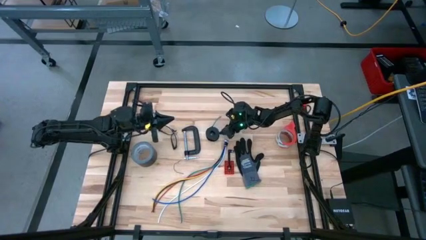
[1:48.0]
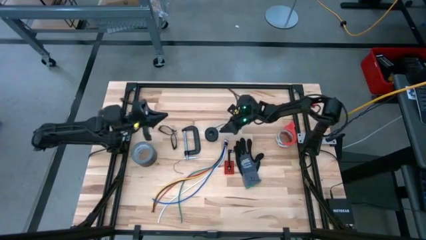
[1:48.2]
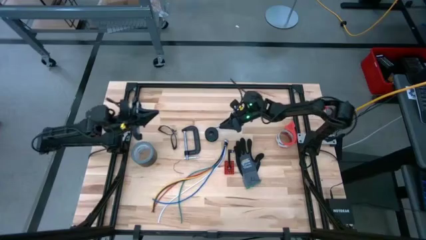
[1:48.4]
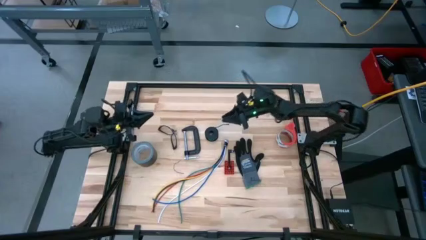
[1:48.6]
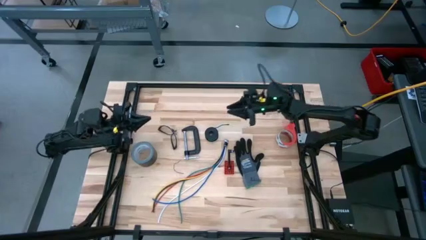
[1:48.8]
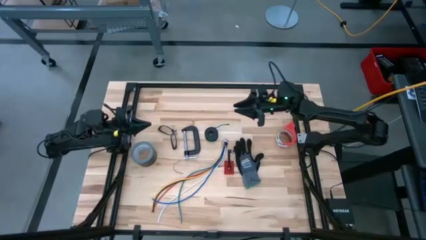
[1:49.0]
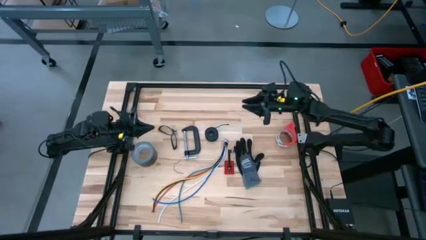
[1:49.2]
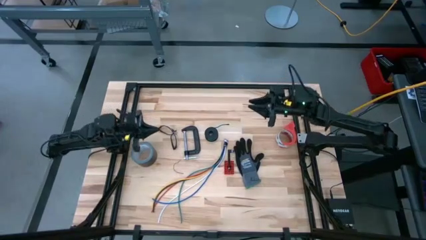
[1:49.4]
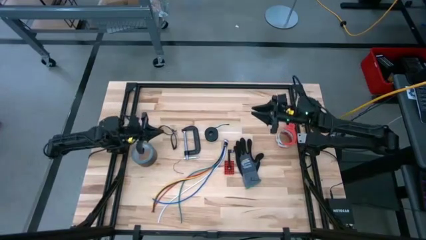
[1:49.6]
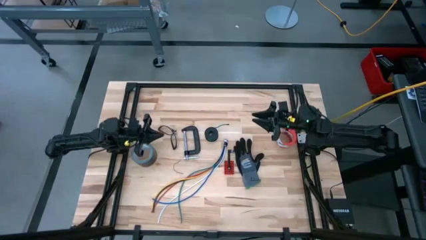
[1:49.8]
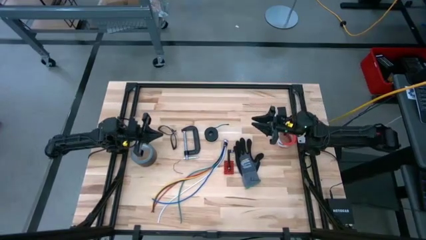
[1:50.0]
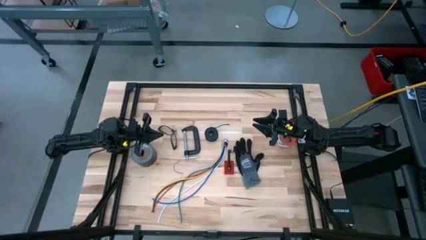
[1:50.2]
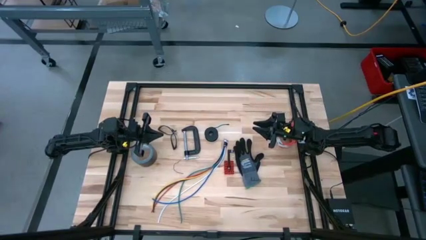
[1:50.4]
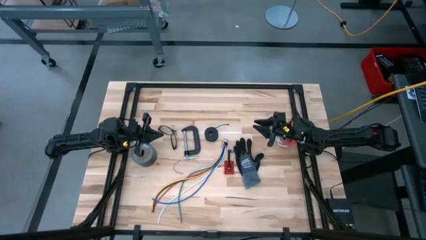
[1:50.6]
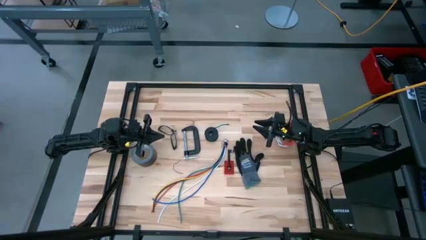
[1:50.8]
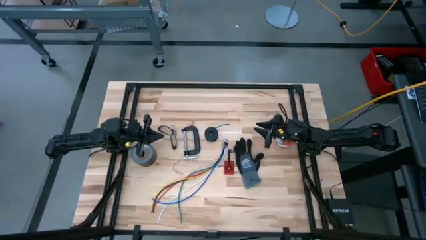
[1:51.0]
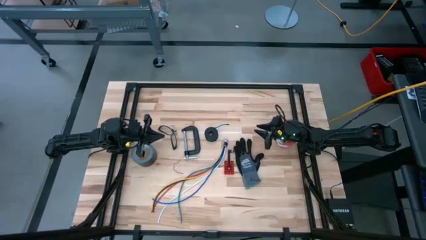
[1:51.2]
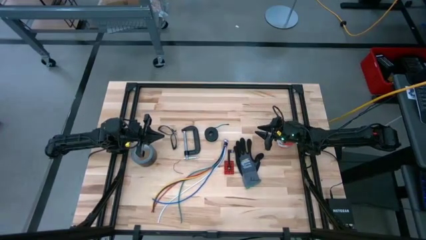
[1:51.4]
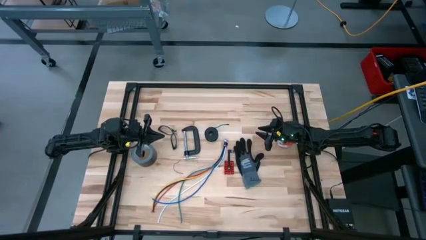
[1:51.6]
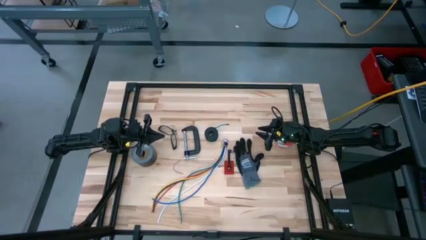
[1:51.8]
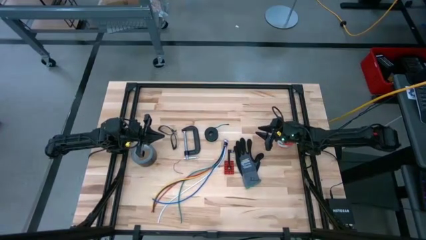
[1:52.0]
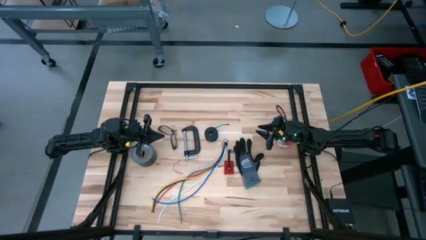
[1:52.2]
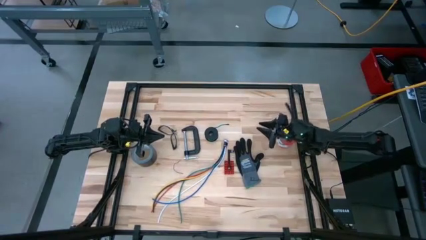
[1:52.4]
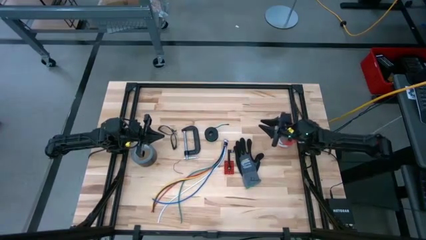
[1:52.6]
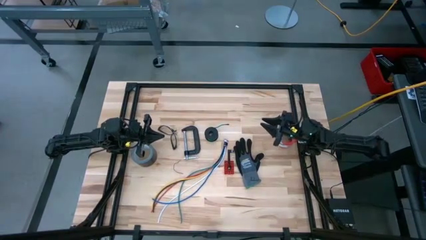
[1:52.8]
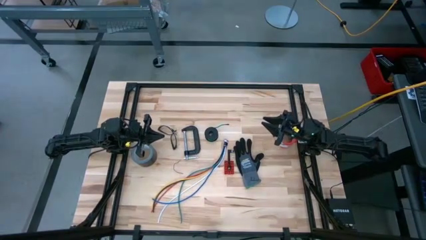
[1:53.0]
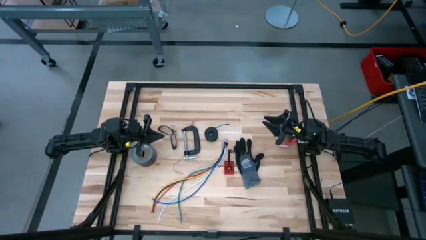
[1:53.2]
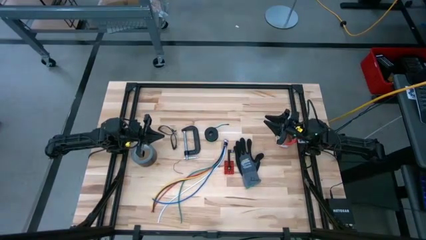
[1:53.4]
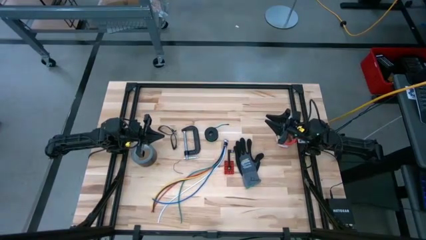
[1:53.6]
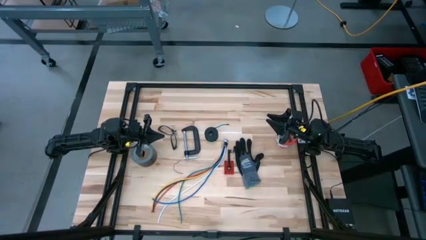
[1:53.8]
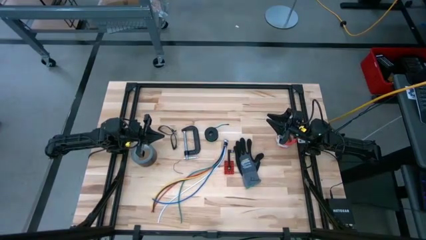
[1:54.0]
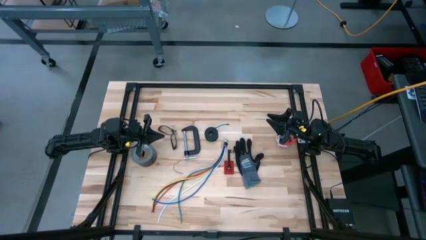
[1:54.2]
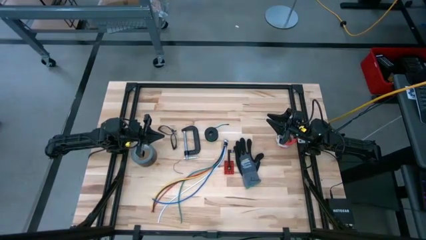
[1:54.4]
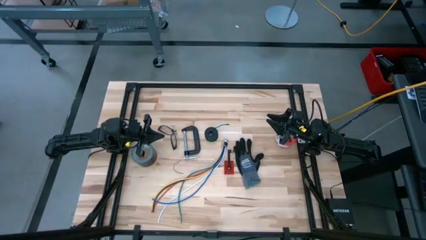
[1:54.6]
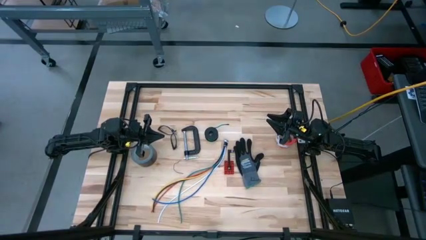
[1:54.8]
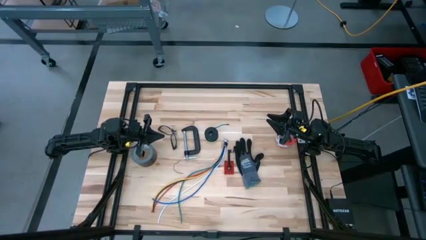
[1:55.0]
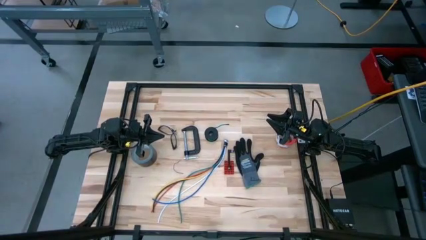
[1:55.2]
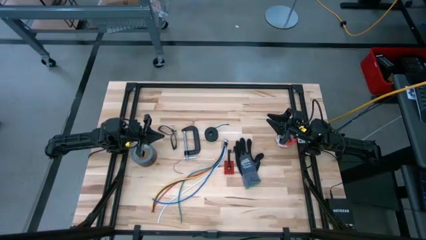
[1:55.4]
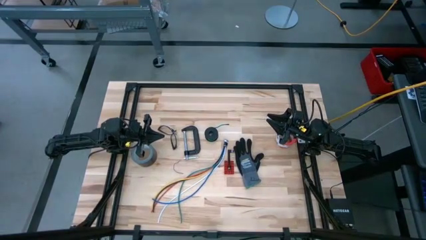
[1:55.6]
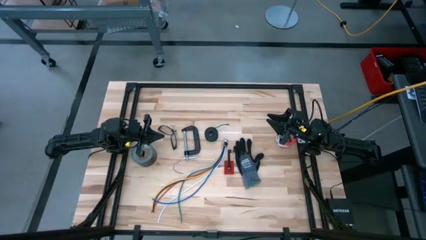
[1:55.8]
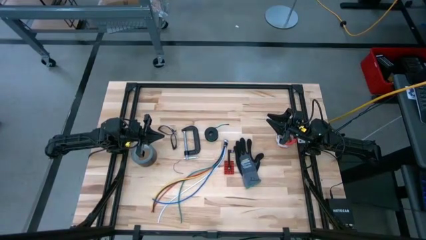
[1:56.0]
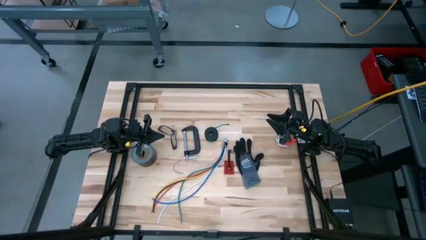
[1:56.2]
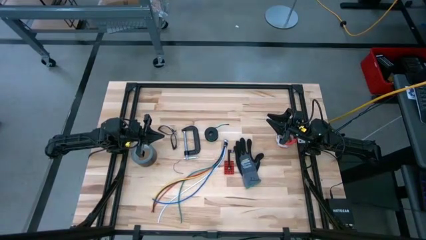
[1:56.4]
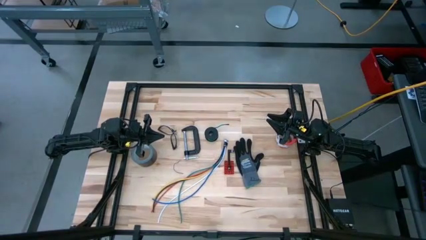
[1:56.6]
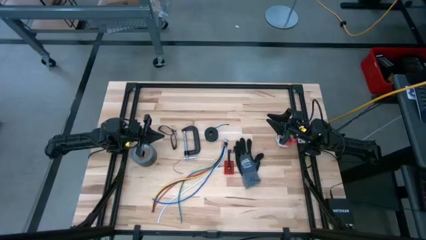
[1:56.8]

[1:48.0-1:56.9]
Task: Coil cords
Return to Home Position

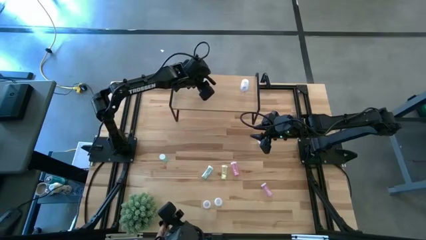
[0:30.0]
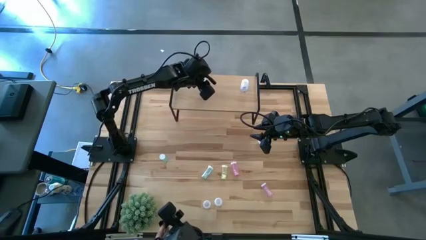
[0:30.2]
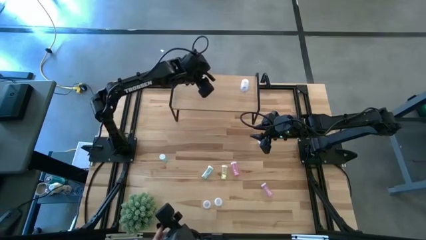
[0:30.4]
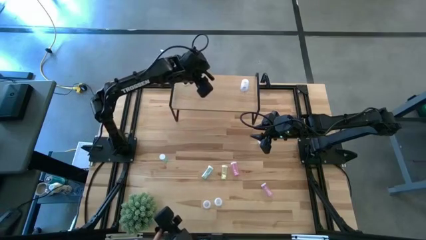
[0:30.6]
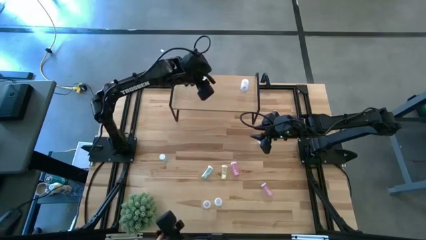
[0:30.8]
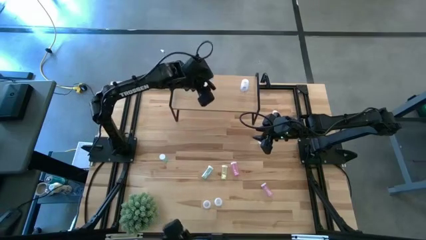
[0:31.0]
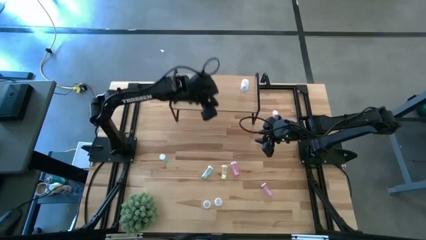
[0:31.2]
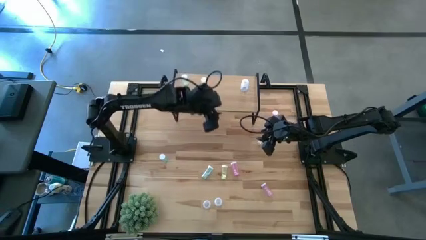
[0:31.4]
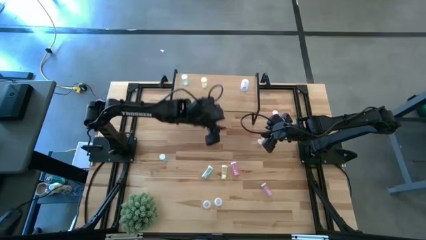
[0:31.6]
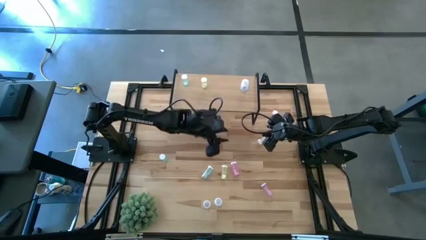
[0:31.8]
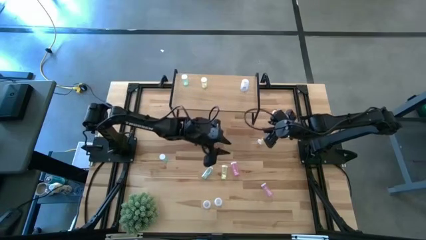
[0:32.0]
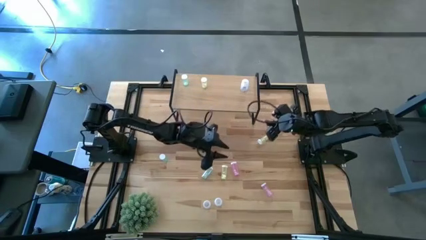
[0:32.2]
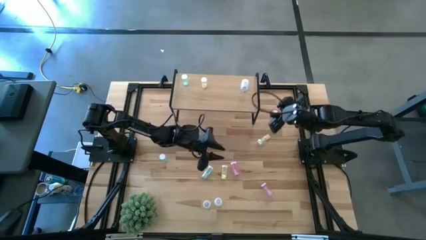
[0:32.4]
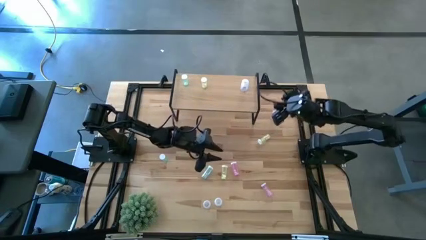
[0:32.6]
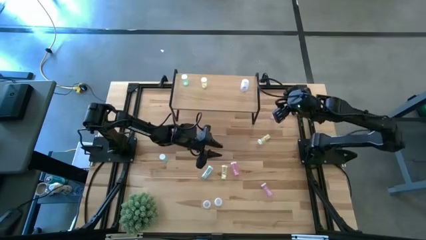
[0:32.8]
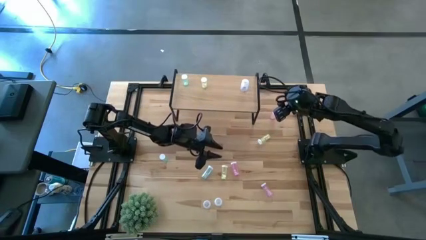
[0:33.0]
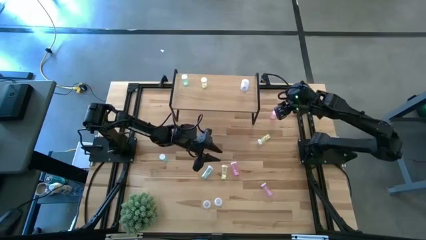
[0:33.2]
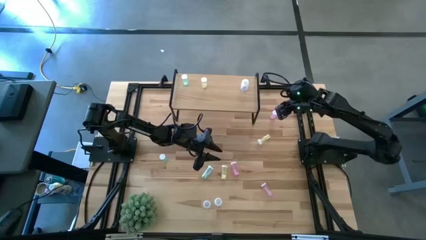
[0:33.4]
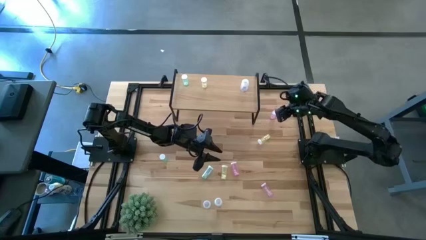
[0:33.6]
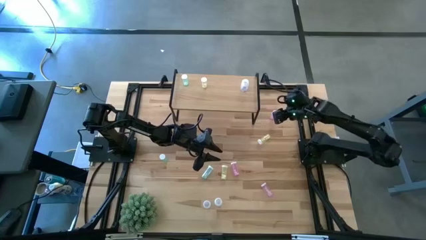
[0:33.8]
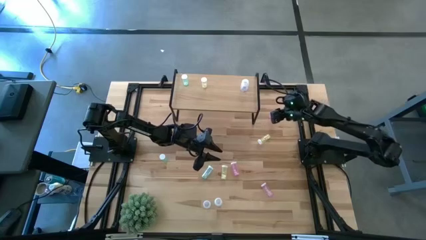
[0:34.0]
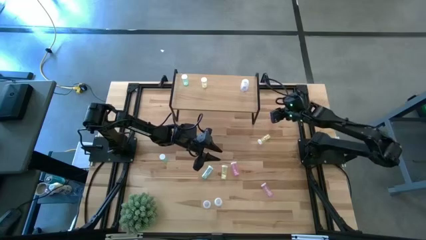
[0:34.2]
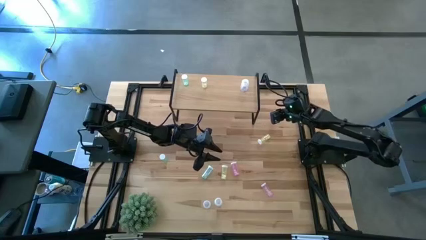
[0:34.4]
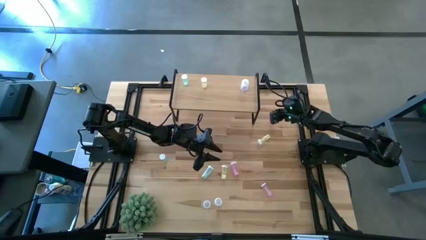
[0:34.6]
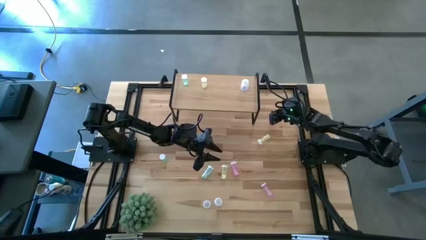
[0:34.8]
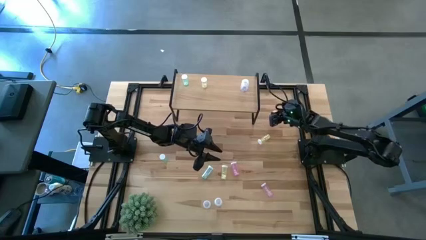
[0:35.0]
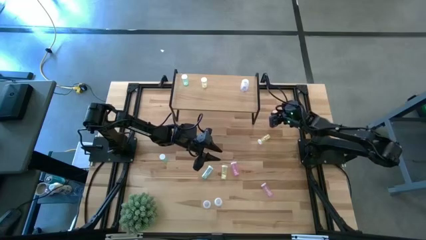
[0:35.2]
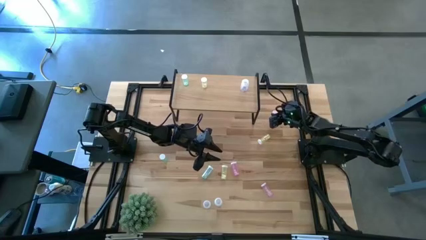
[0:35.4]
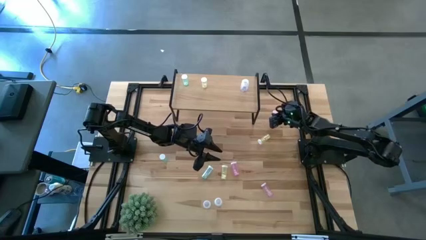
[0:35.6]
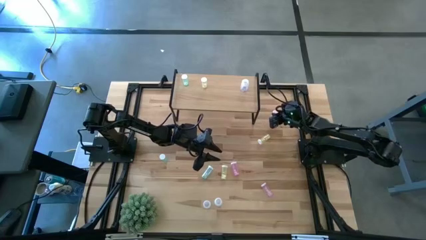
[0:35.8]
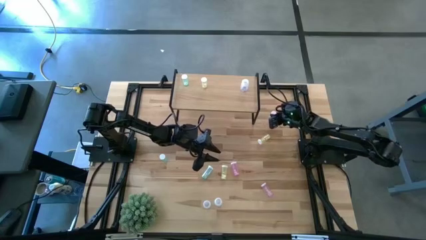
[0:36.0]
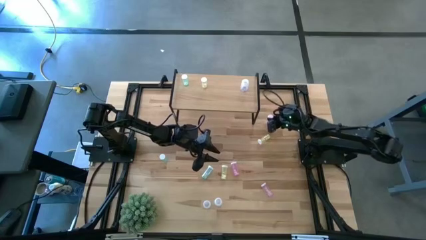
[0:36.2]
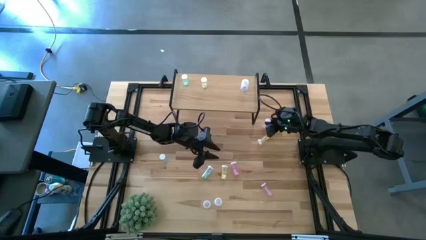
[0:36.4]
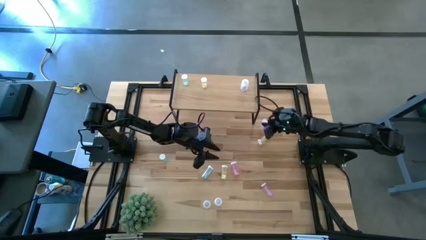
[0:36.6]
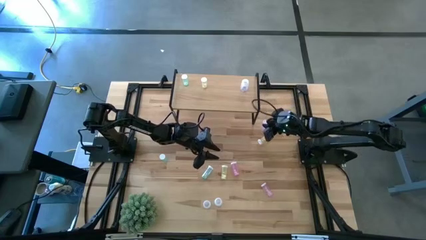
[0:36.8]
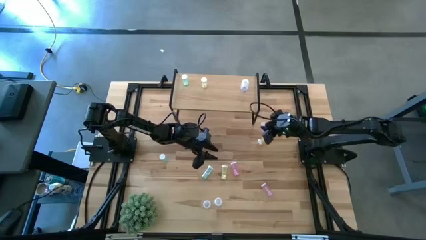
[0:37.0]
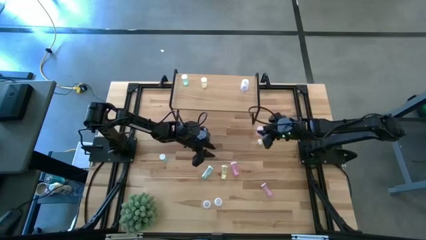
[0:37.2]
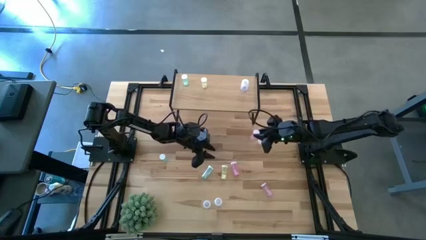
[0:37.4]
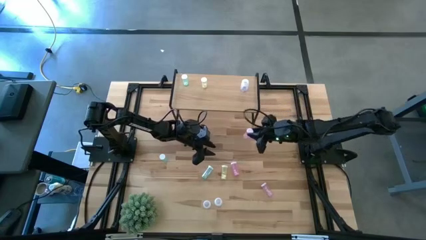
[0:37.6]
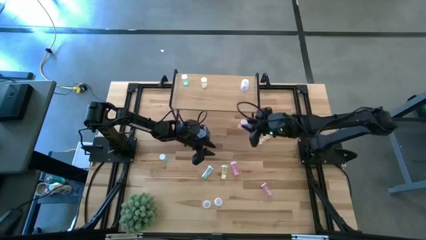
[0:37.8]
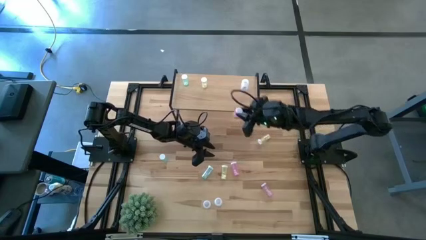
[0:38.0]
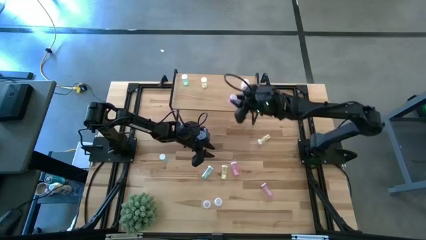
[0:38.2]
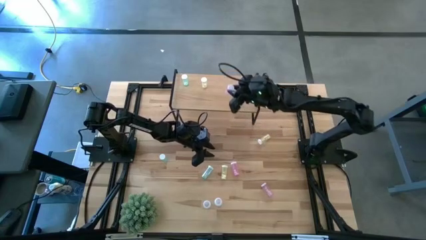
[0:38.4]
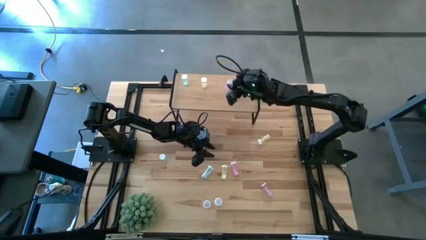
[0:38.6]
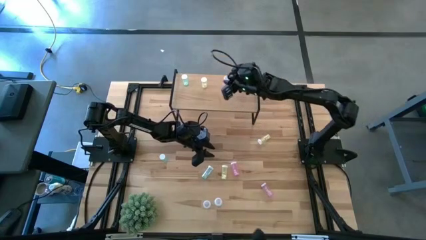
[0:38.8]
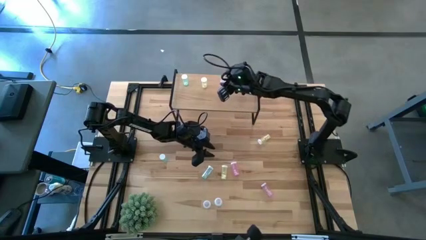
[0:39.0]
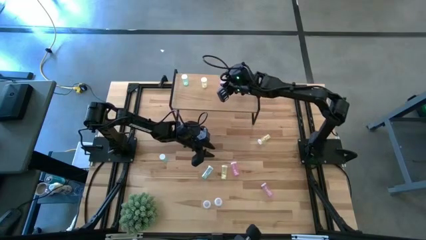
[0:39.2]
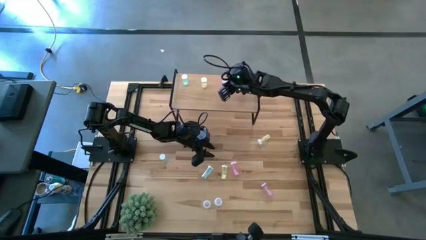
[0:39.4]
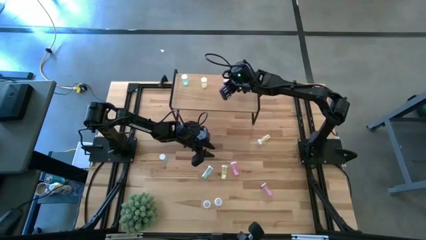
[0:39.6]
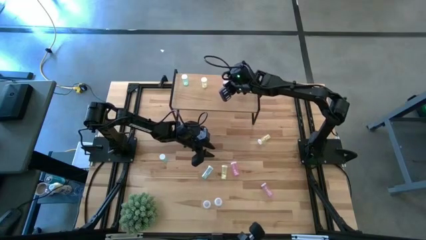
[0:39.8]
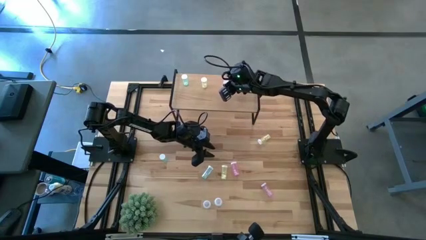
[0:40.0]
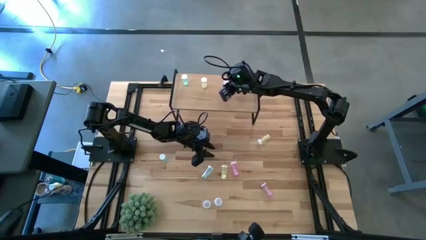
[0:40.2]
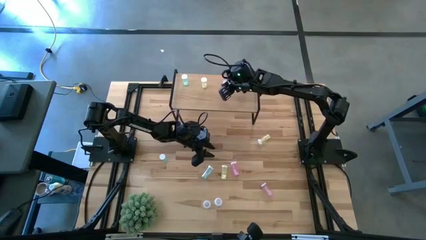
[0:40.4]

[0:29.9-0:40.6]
Task: Pick and place medicine bottles onto shelf by color
Put the top pink pill bottle on the shelf
